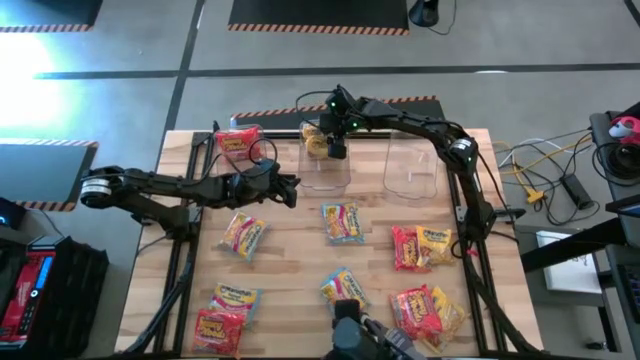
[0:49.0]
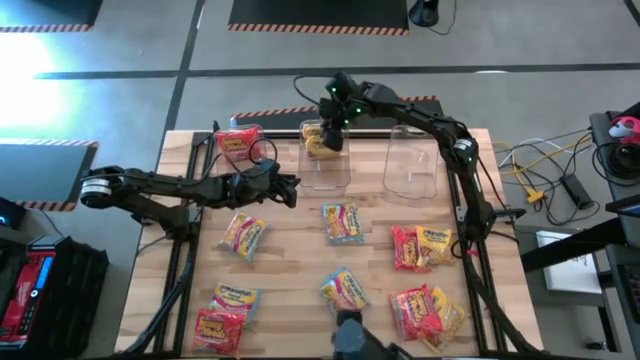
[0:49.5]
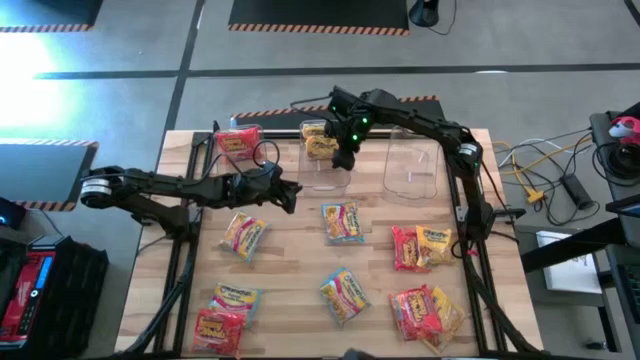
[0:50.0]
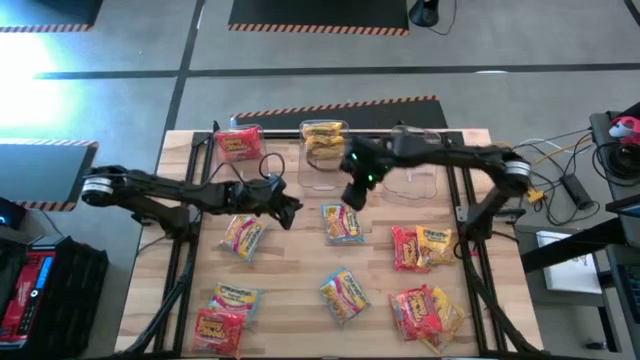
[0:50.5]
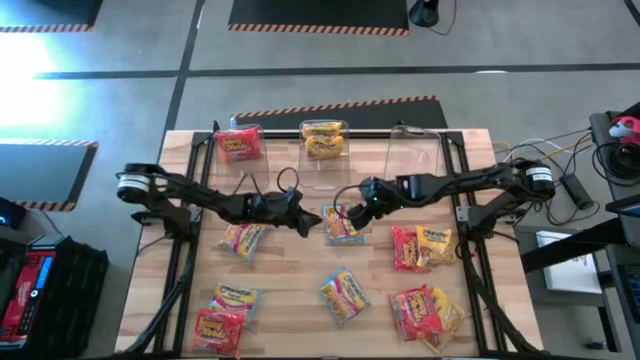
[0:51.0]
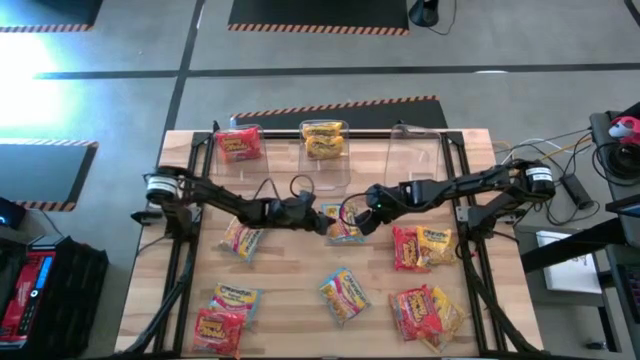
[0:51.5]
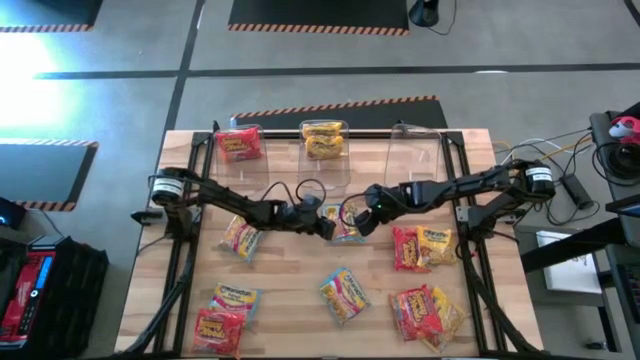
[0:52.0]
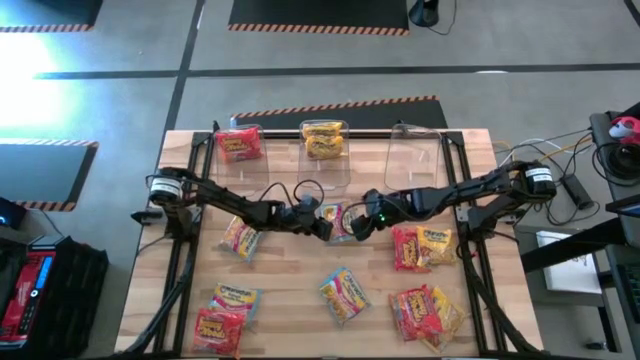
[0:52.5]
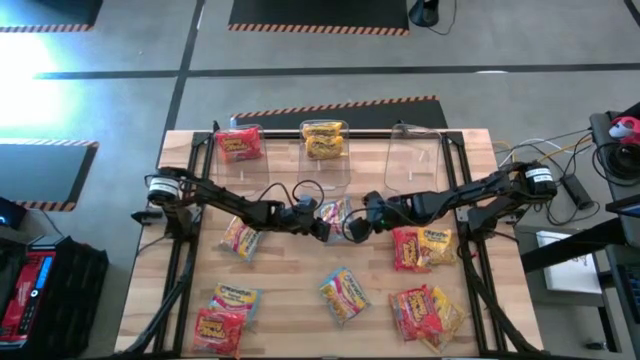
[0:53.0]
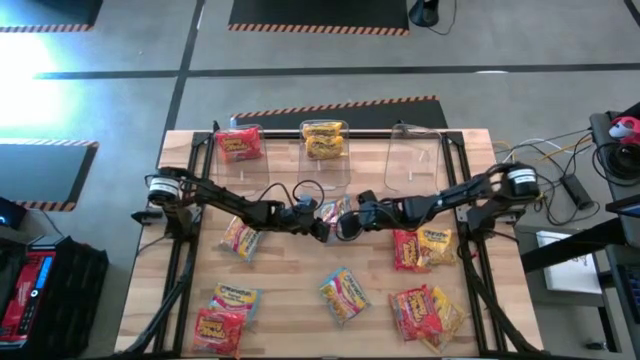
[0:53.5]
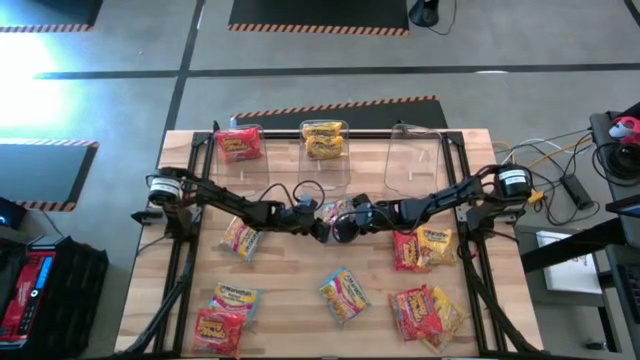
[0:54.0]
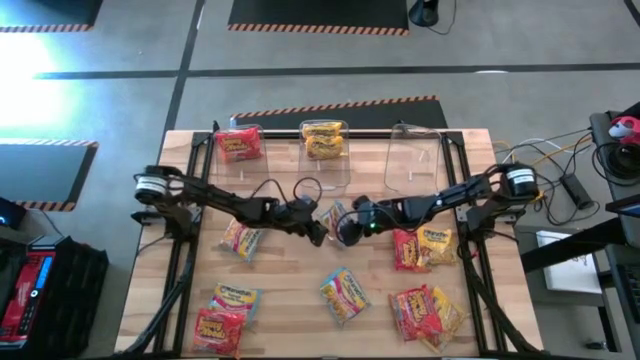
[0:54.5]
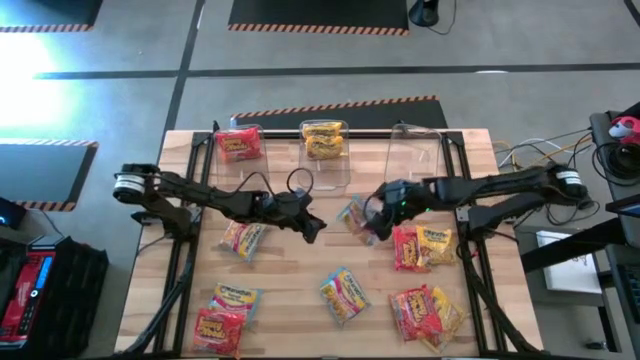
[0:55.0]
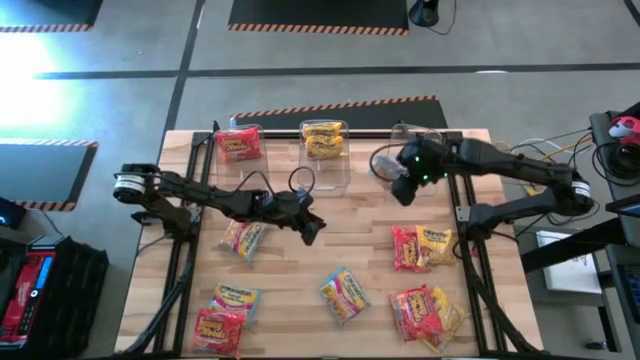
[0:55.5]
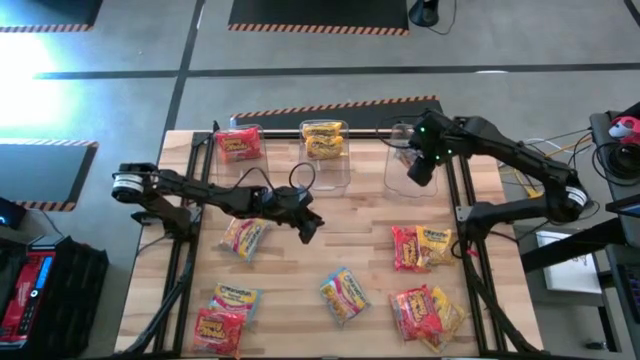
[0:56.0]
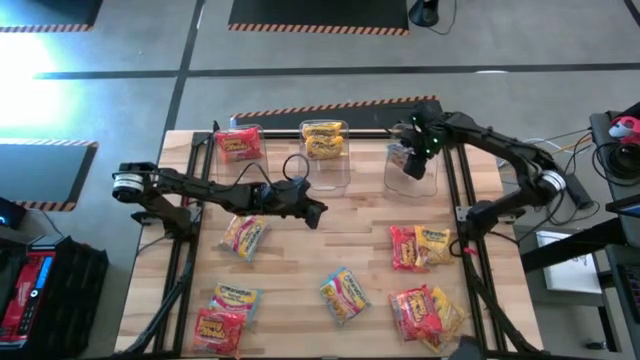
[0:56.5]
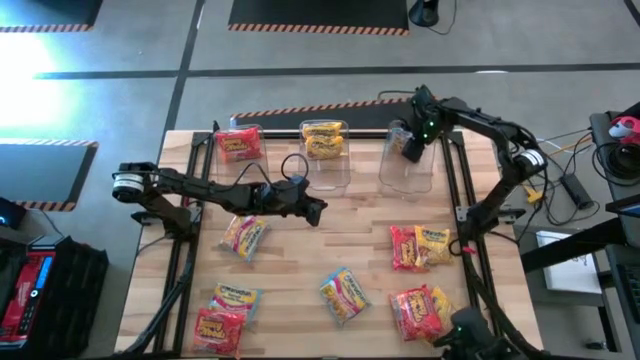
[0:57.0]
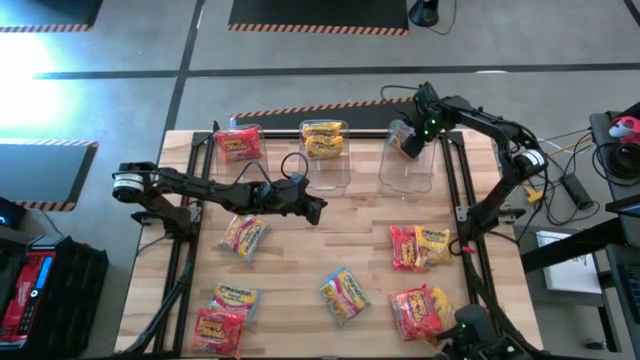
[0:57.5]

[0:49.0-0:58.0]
Task: Sort Maruchan noodles
Put the blue noodle pack into the right transparent bin

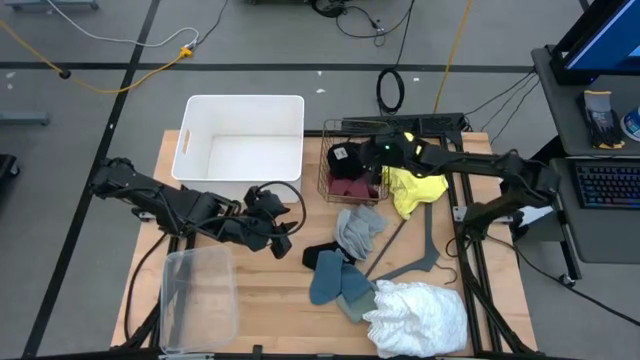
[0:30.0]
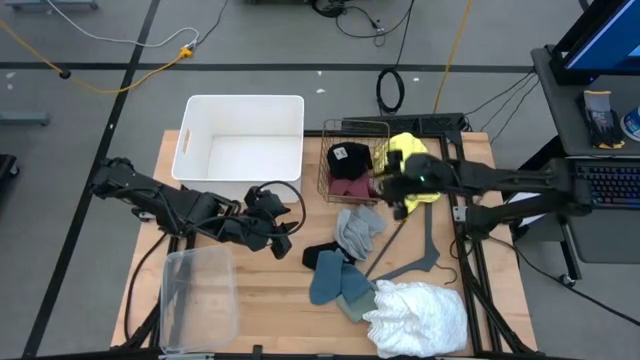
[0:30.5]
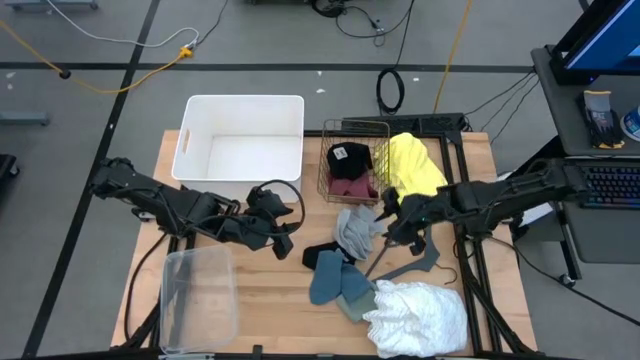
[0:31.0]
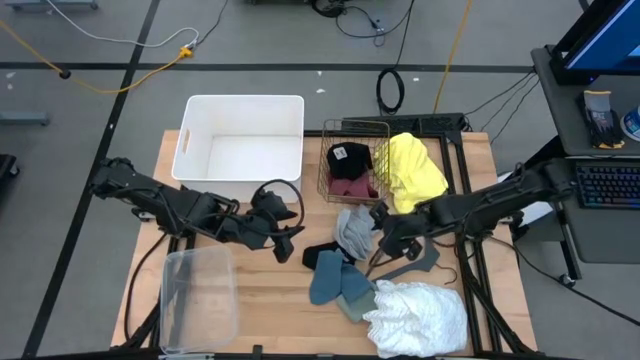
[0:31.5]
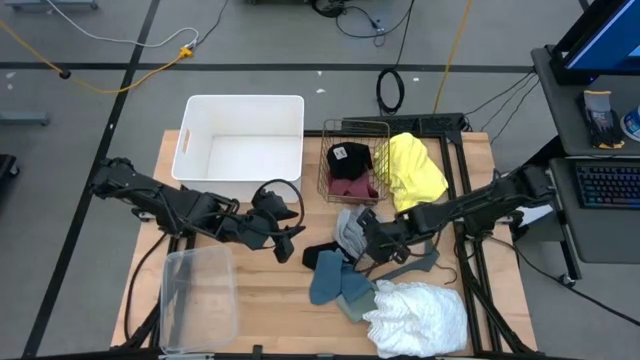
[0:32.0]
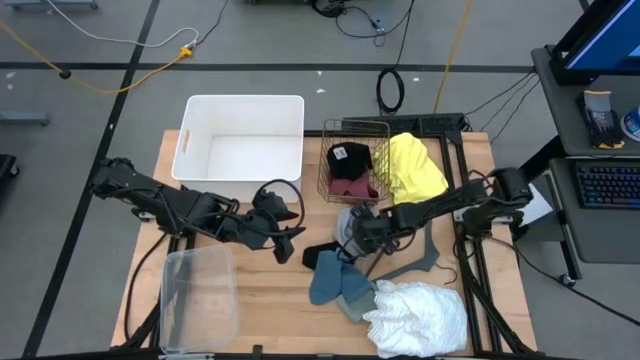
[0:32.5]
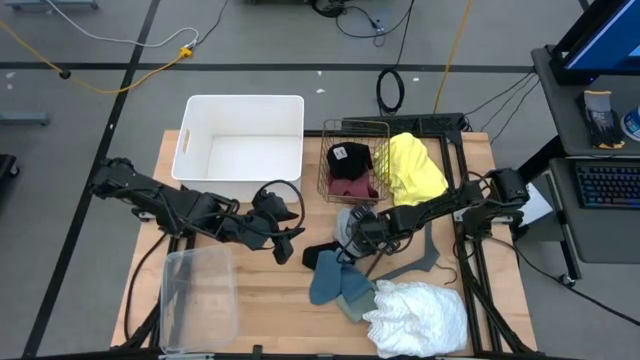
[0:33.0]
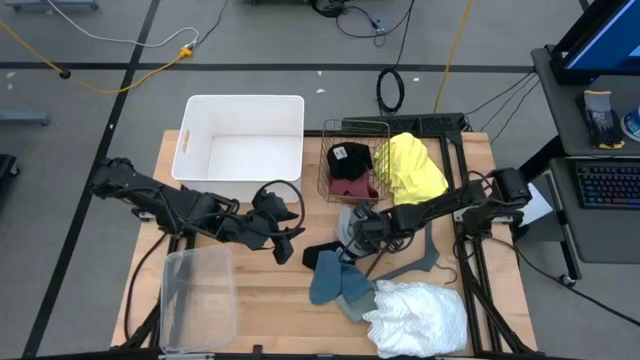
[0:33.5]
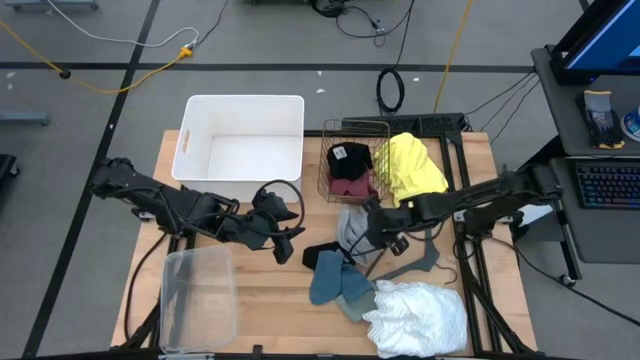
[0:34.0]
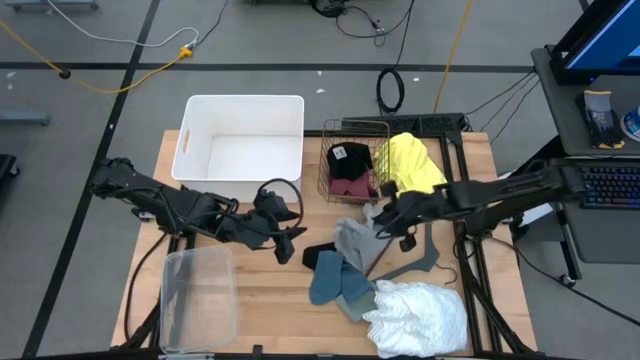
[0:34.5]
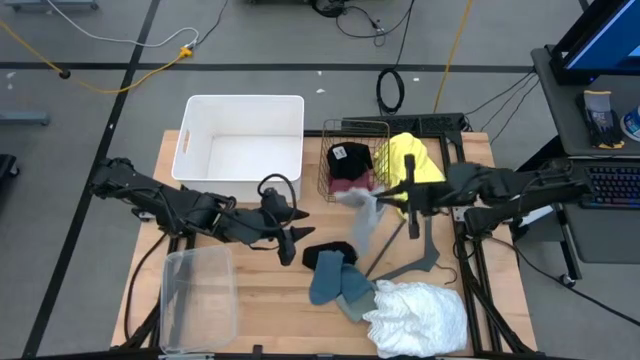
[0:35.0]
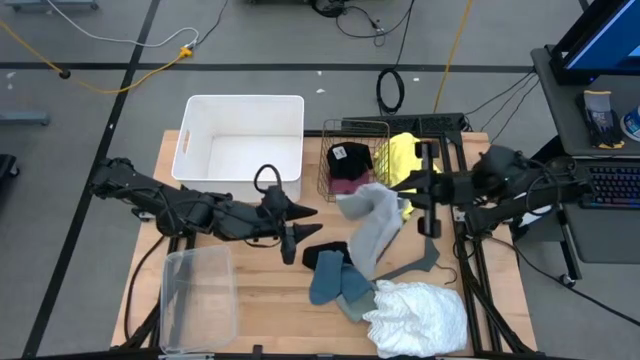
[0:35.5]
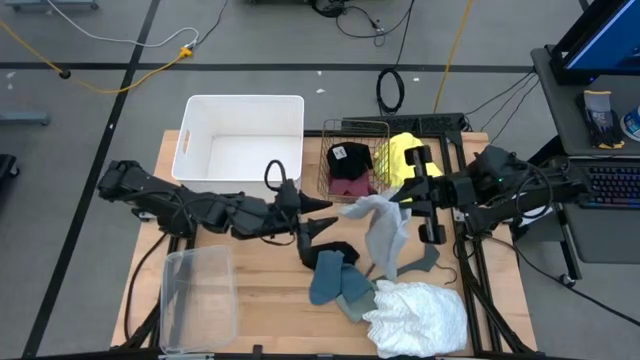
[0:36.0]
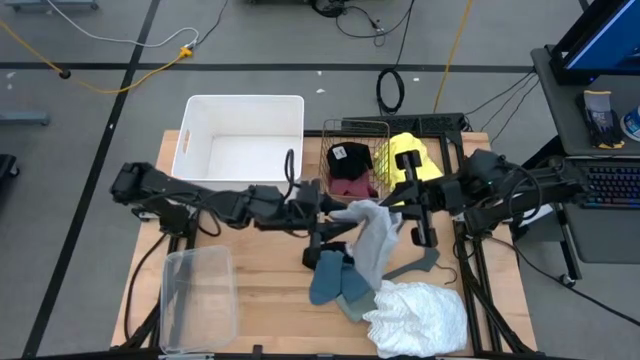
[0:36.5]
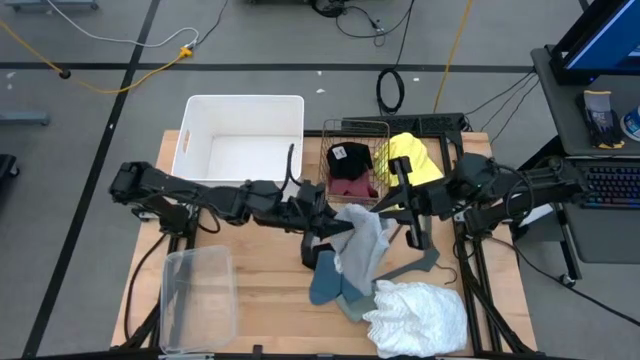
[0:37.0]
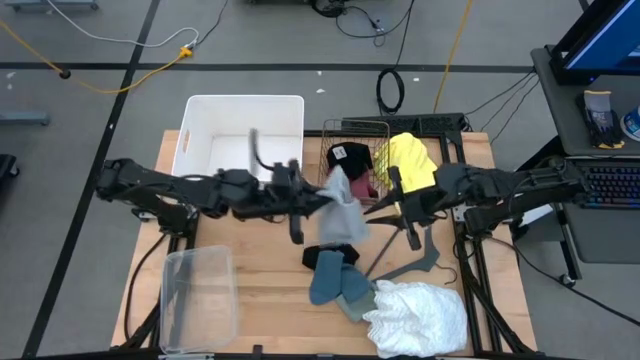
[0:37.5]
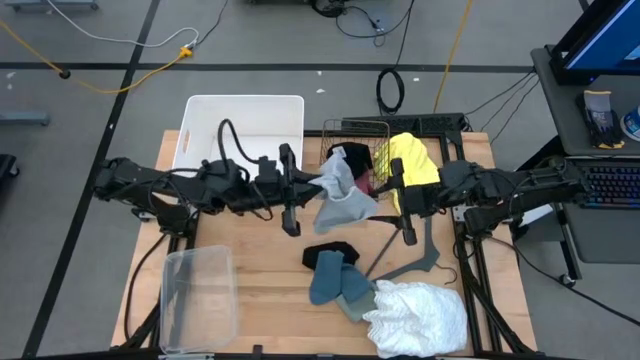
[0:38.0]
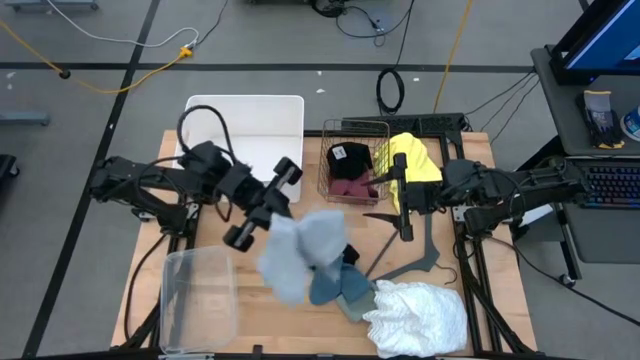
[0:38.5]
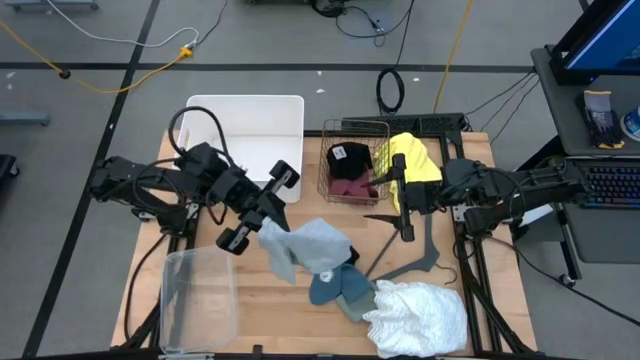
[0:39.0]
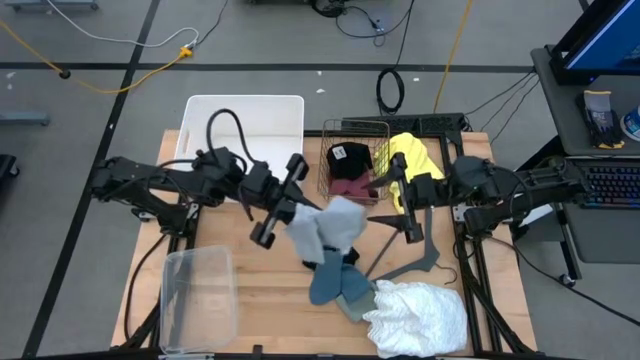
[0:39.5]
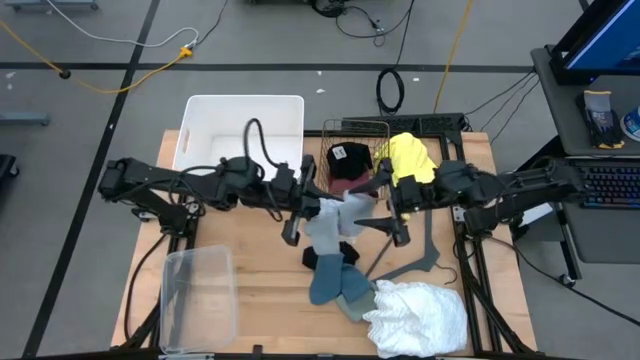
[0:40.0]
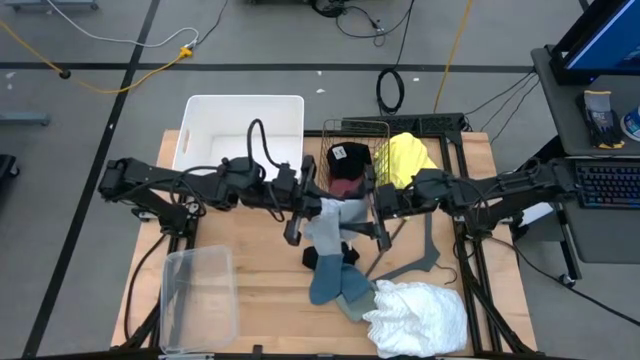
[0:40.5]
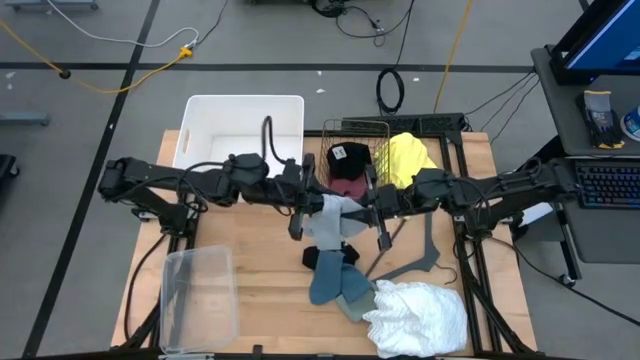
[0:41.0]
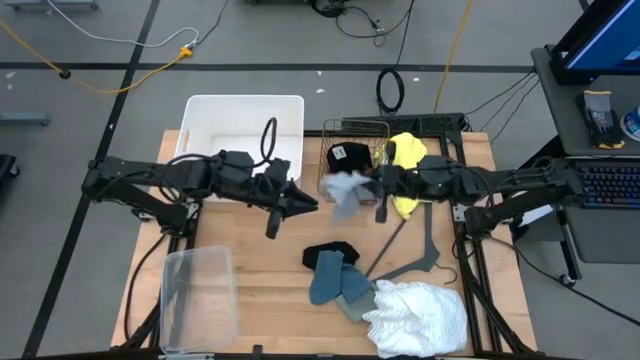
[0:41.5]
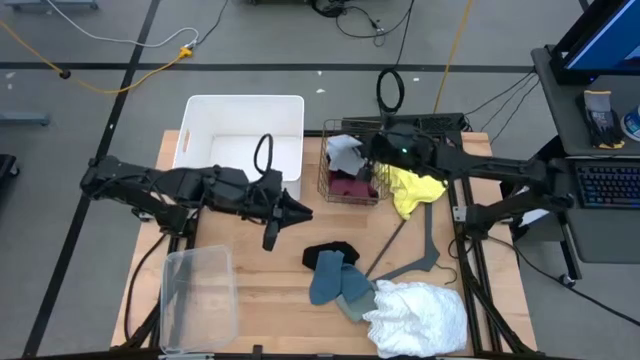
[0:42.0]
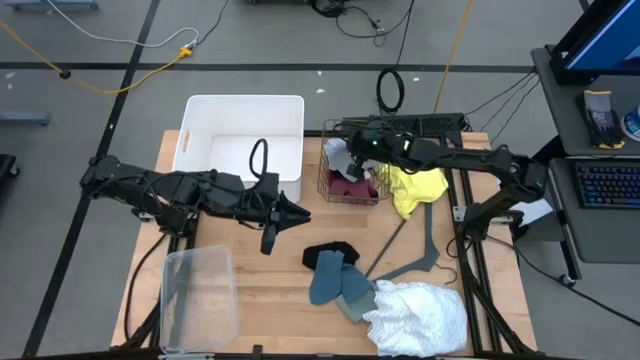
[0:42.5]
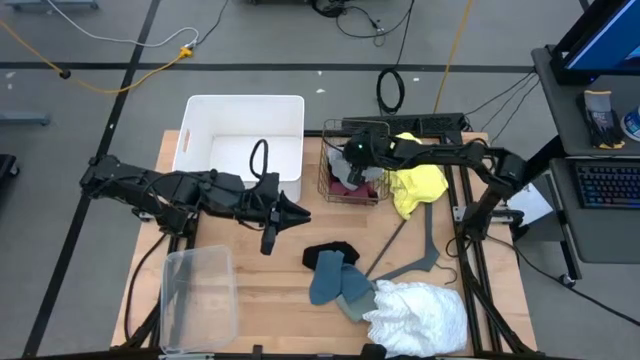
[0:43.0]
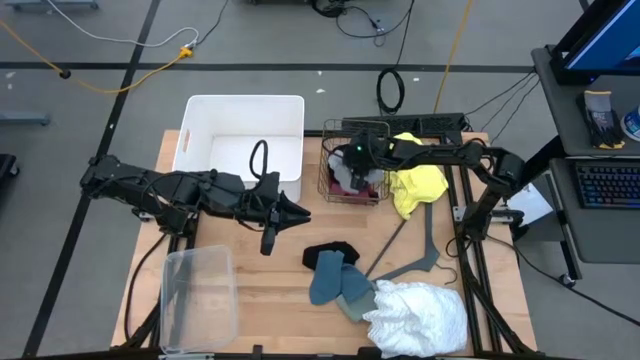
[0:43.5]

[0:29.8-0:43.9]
Task: Pick & Place Cloths
Put the gray boxers into the gold wire basket
